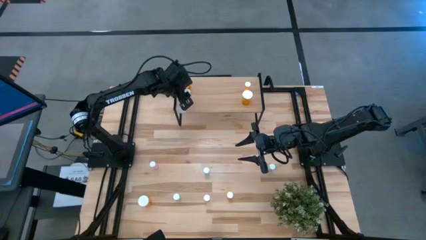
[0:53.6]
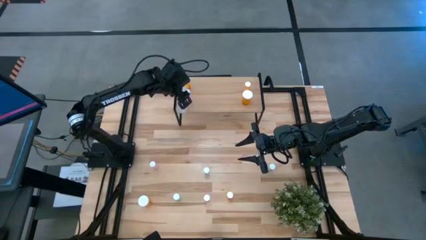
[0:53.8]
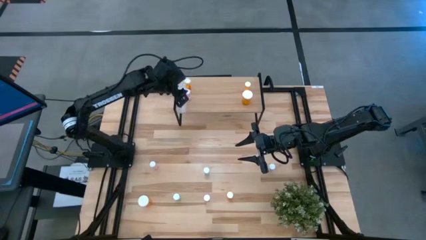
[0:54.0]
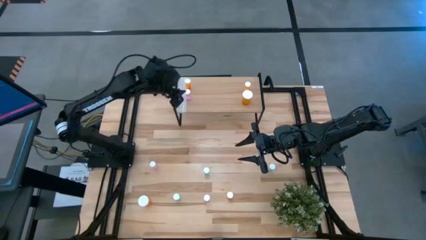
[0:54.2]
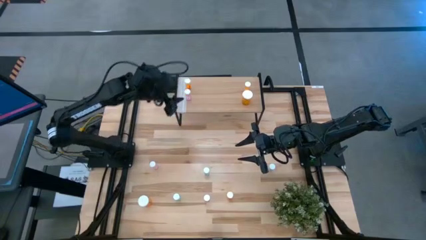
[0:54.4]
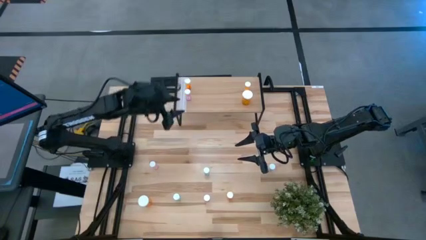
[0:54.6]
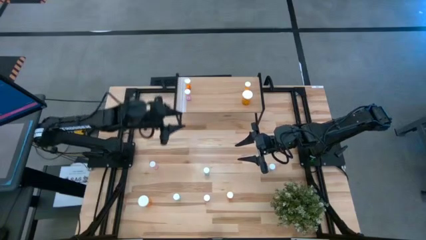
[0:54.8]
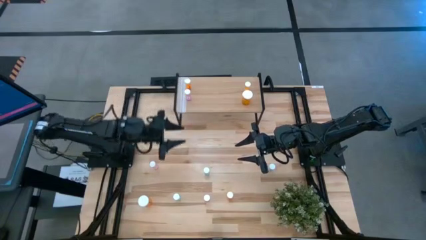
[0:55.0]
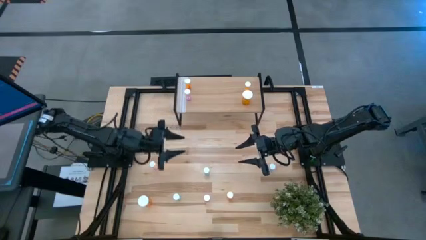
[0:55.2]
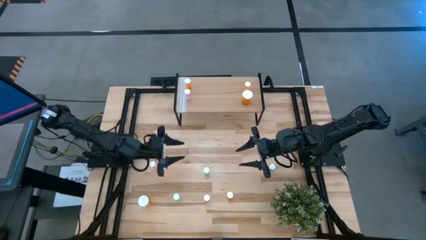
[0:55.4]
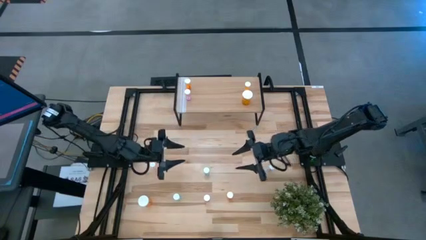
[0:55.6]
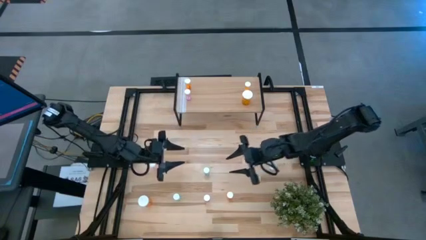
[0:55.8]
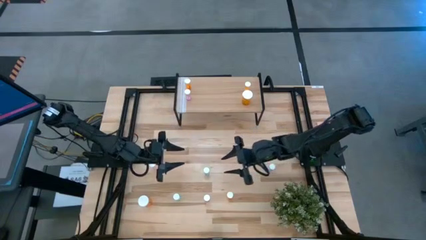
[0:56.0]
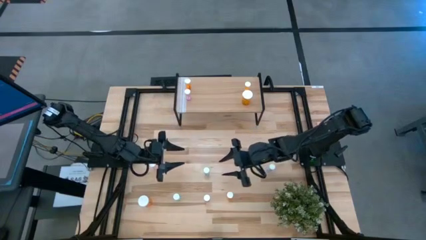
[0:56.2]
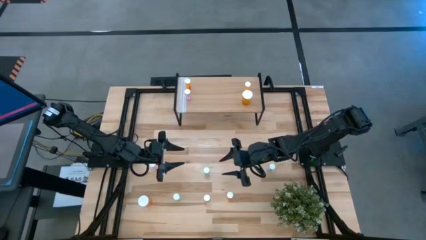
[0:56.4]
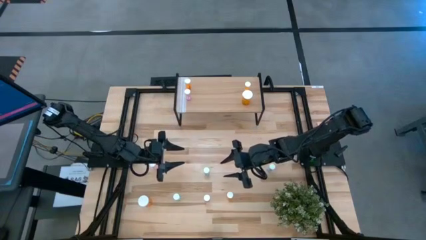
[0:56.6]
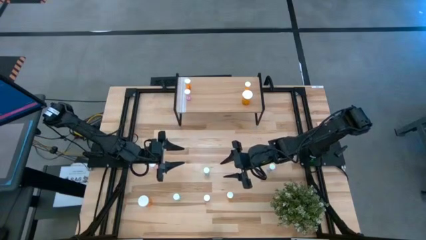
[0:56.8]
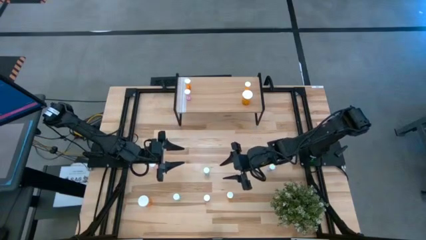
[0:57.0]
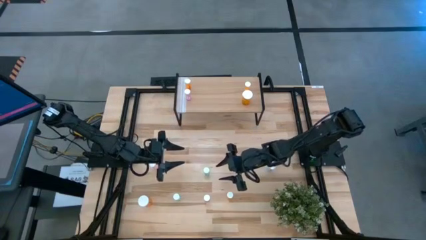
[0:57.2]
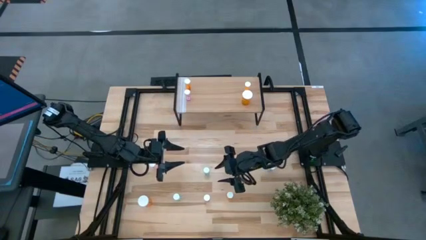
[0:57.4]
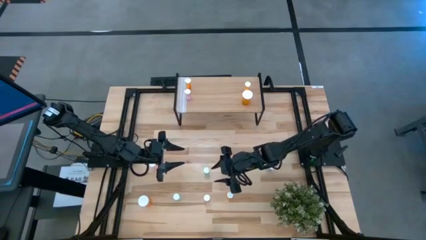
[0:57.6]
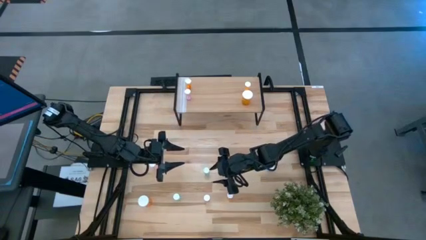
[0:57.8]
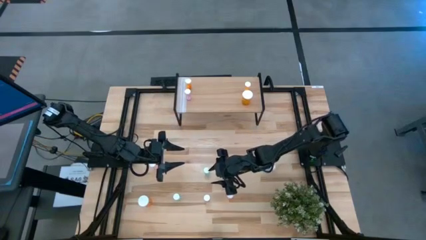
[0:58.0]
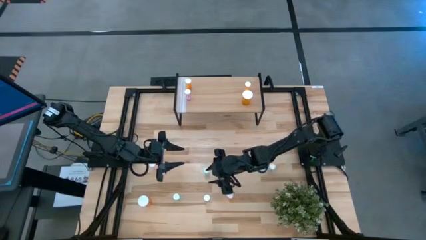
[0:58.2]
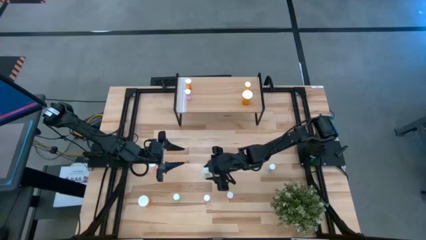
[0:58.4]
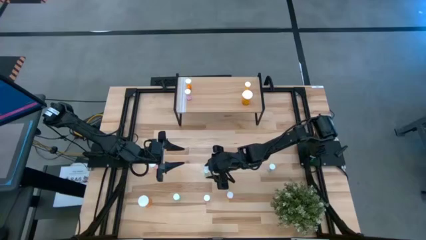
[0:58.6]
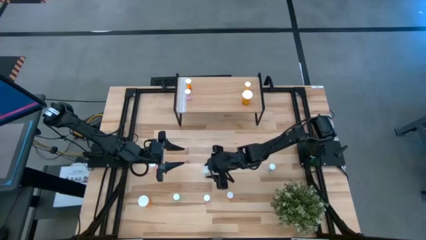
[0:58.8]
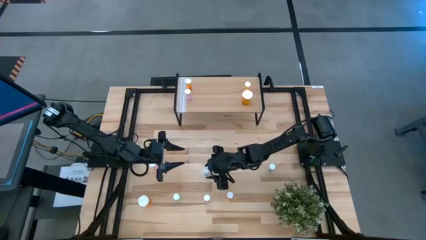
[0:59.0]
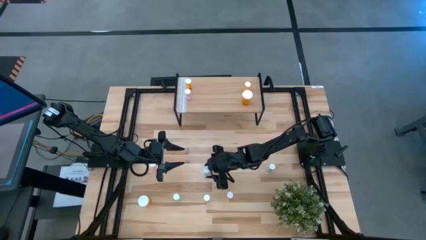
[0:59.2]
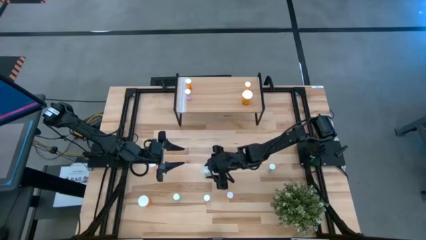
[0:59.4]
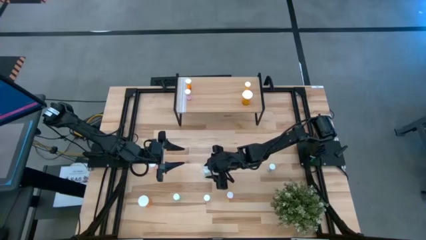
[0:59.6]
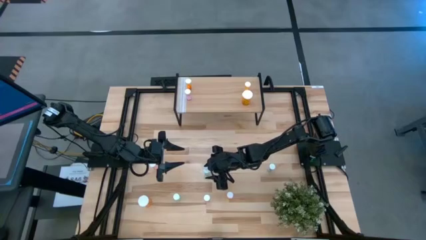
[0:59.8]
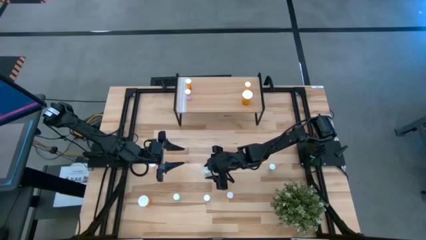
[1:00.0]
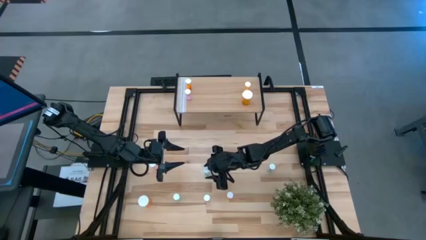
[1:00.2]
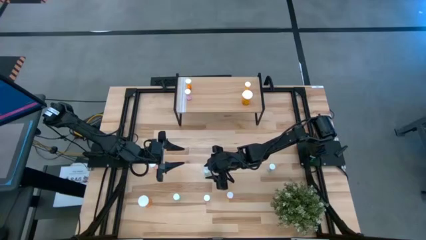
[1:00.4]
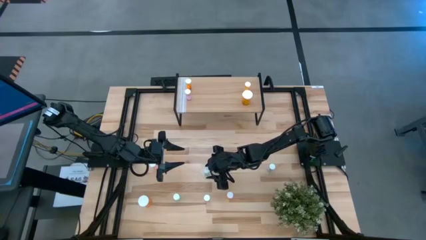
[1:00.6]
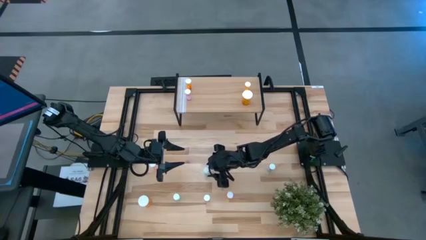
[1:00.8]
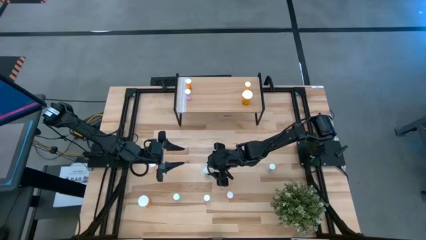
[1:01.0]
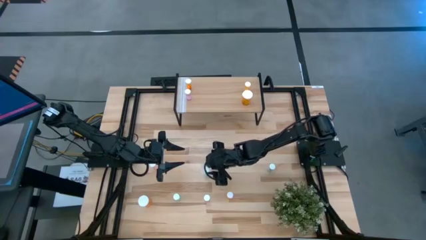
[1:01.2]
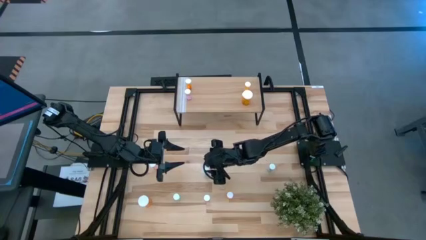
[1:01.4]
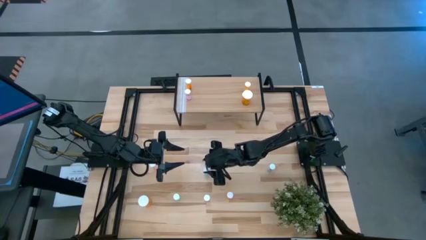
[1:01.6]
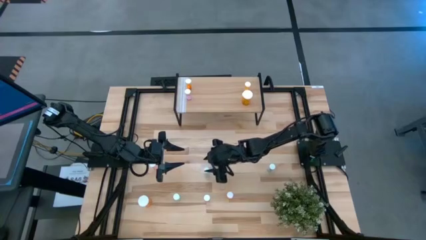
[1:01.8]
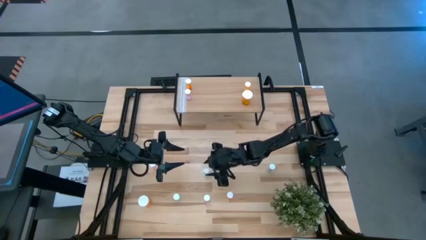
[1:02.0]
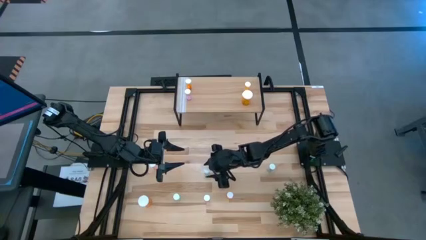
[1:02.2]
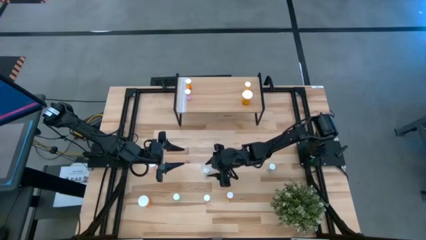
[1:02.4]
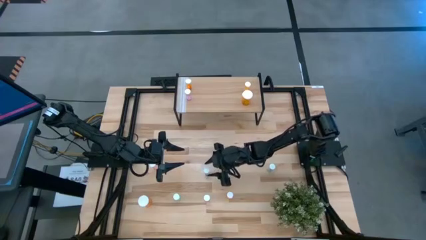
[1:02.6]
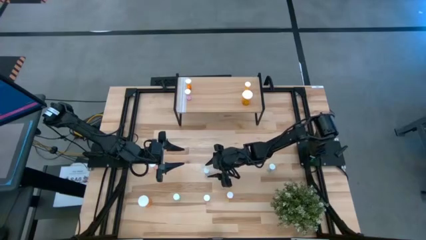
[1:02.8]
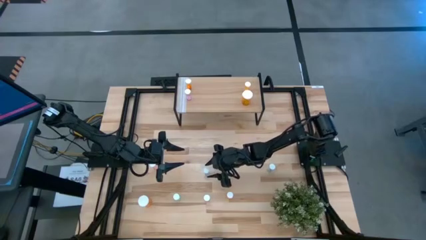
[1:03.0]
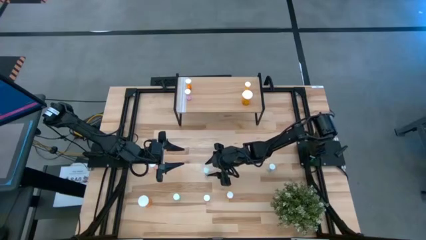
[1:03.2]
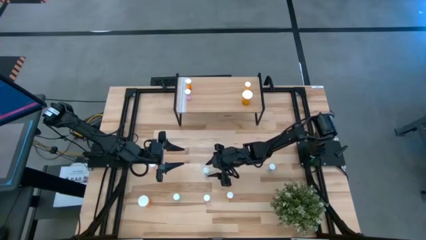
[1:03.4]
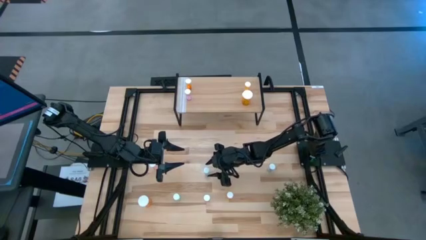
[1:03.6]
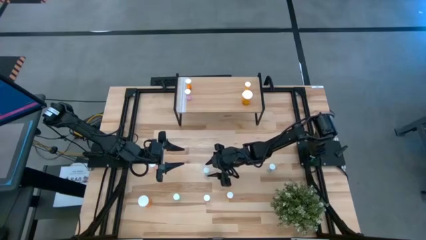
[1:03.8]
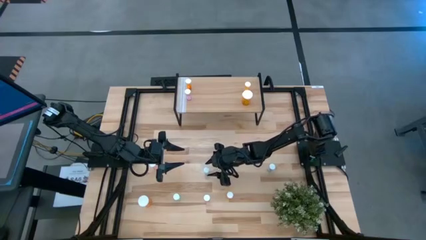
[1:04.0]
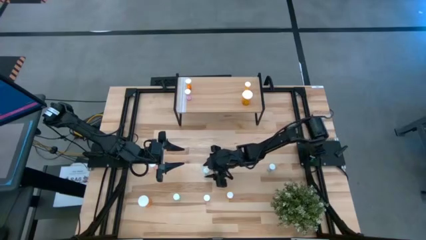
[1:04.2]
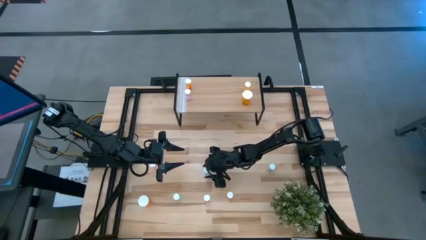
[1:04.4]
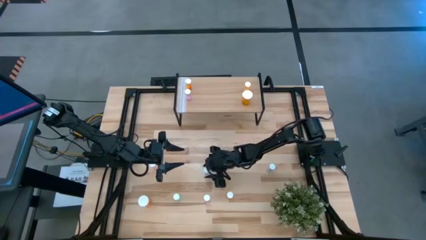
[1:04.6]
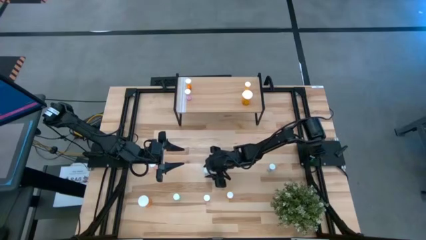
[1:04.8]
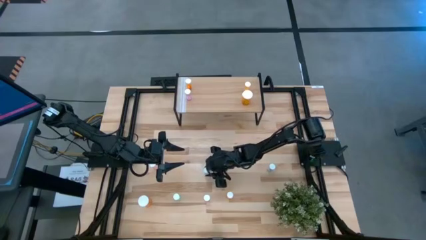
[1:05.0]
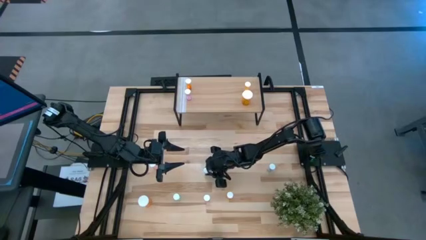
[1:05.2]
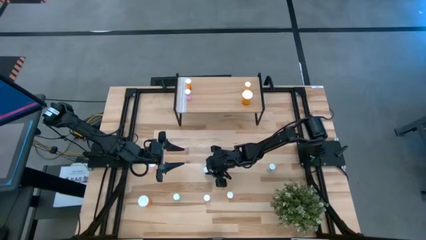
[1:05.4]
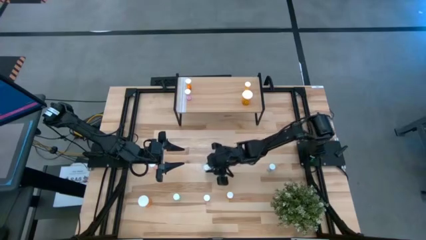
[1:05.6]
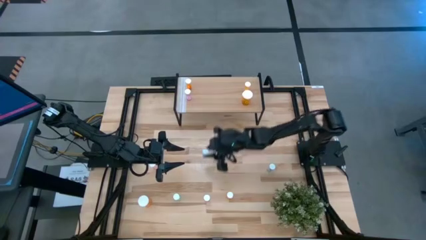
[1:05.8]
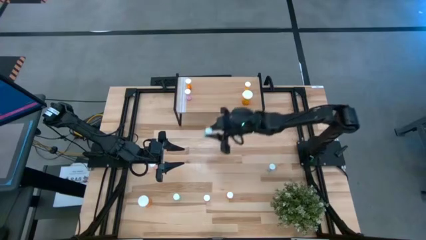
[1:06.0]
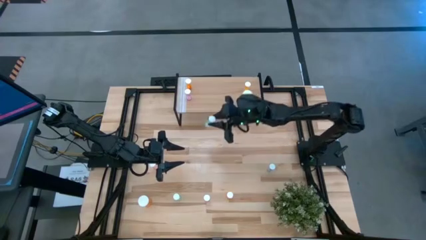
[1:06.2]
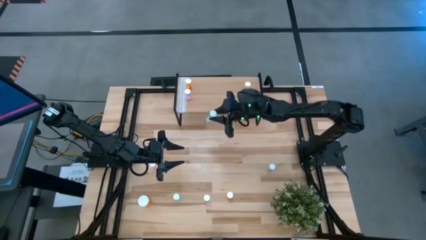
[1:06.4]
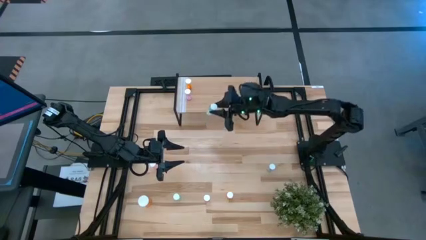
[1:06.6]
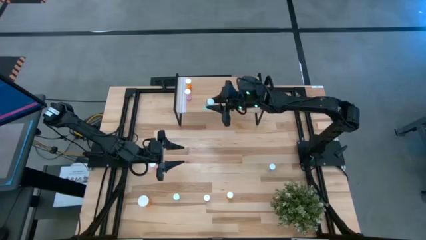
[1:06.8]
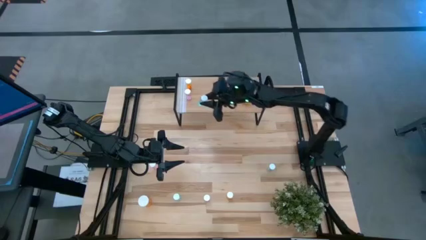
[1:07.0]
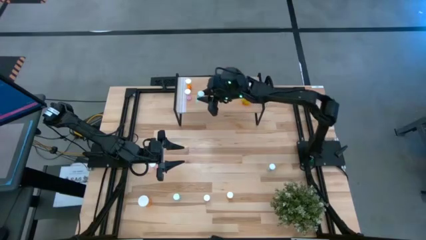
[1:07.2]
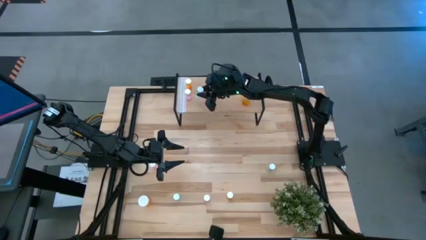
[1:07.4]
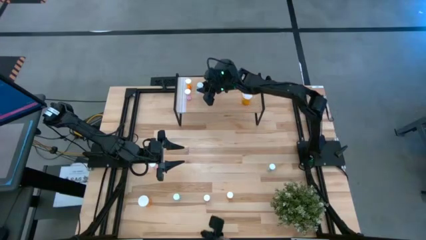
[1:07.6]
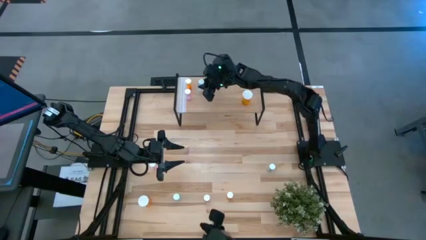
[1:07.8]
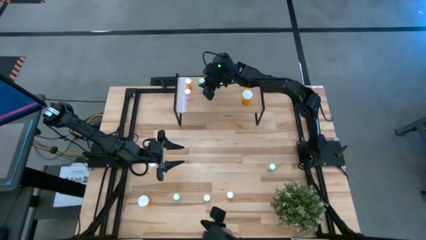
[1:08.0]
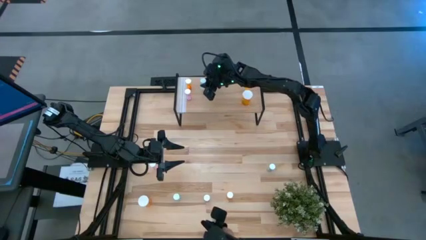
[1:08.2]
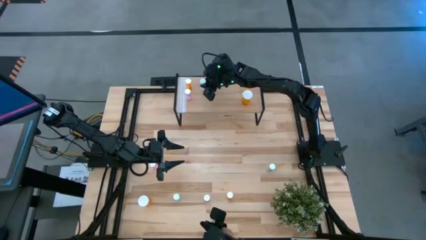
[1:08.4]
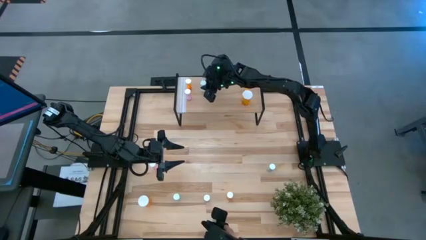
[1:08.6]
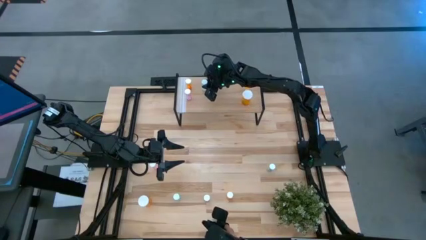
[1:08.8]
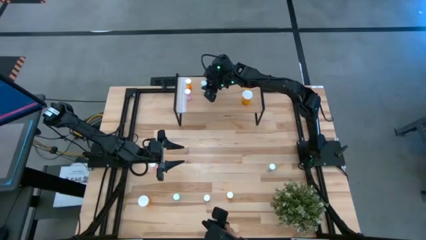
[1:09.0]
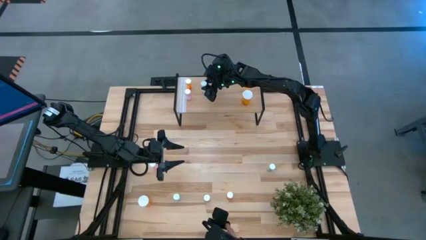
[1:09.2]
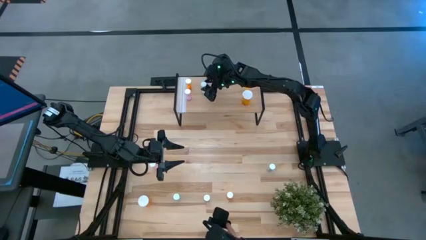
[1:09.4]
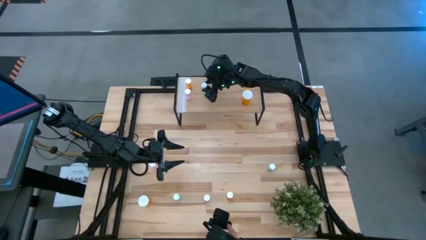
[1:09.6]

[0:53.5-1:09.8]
Task: Pick and place medicine bottles onto shelf by color
Put the top left blue pill bottle on the shelf
